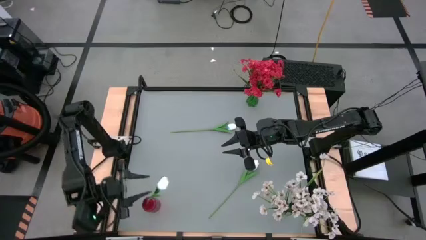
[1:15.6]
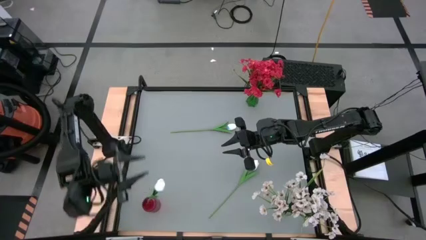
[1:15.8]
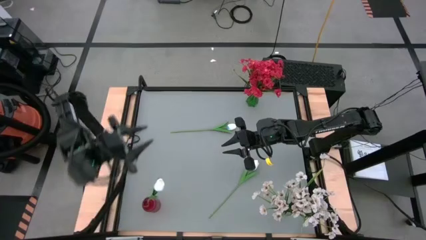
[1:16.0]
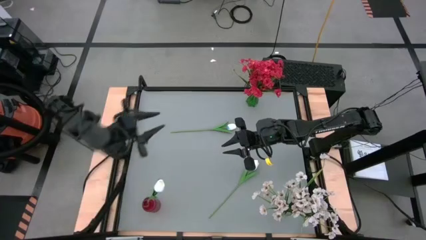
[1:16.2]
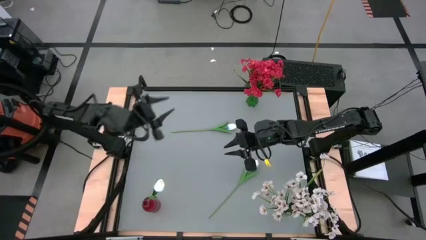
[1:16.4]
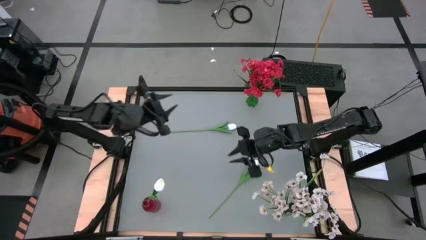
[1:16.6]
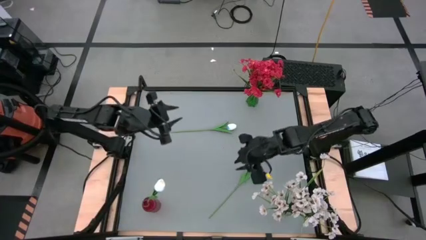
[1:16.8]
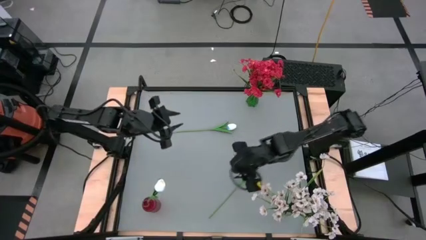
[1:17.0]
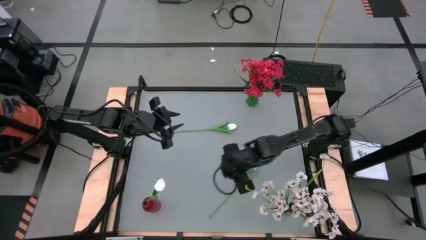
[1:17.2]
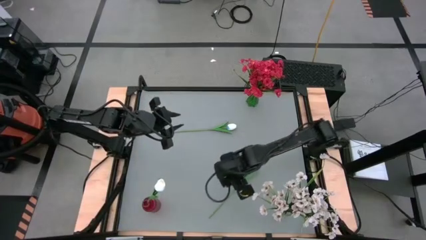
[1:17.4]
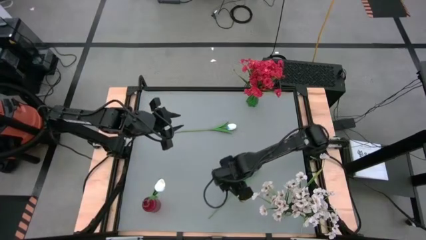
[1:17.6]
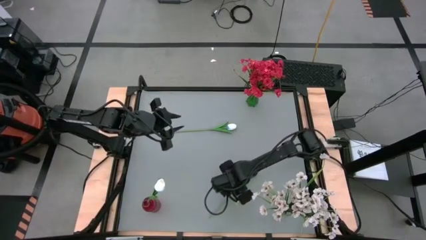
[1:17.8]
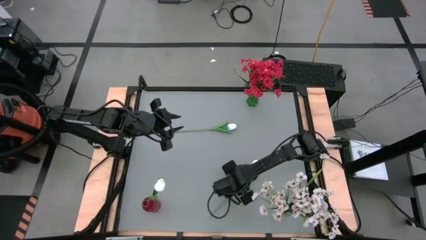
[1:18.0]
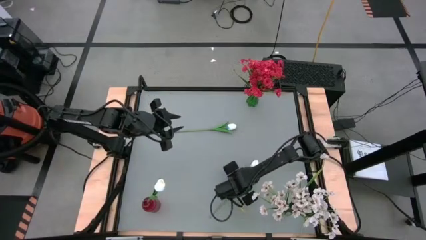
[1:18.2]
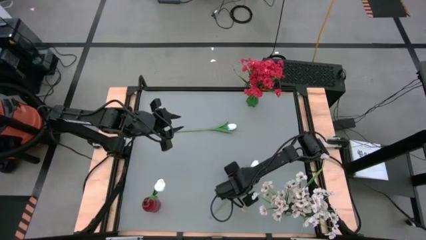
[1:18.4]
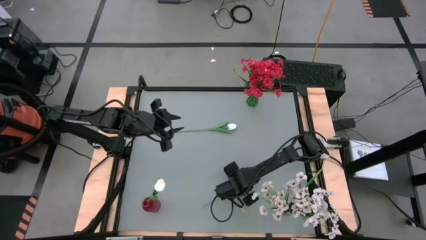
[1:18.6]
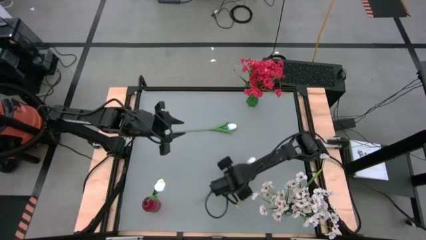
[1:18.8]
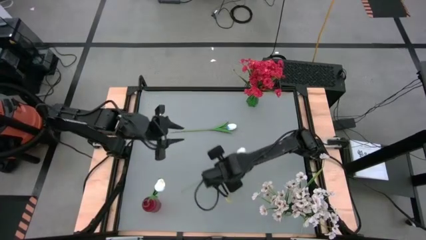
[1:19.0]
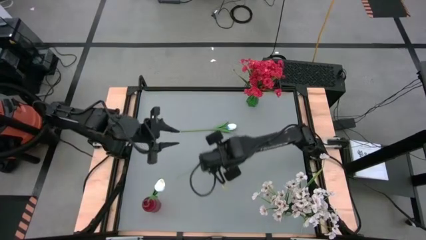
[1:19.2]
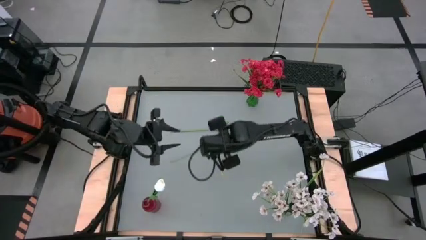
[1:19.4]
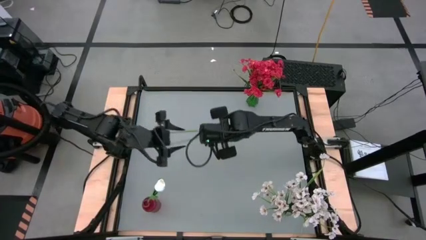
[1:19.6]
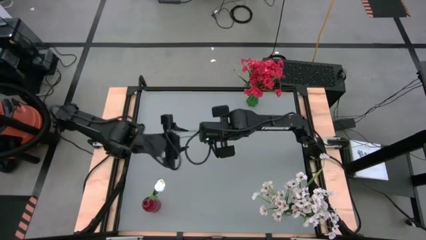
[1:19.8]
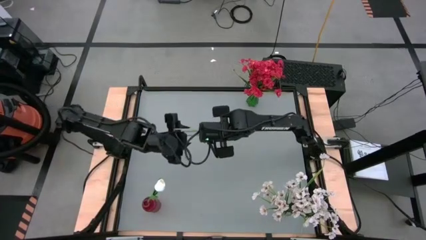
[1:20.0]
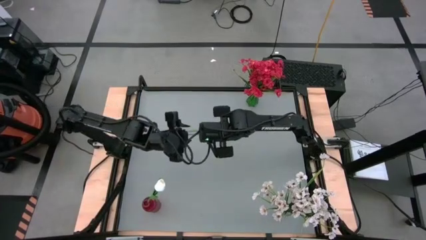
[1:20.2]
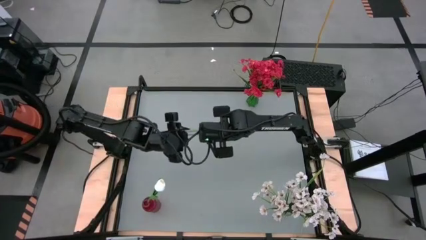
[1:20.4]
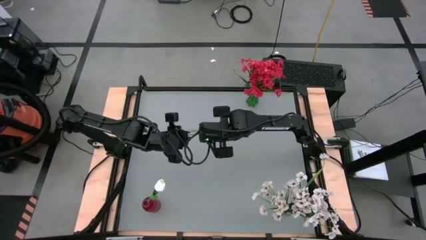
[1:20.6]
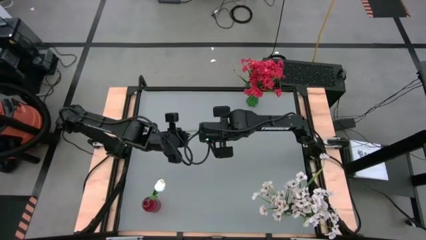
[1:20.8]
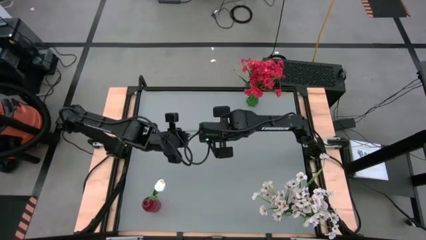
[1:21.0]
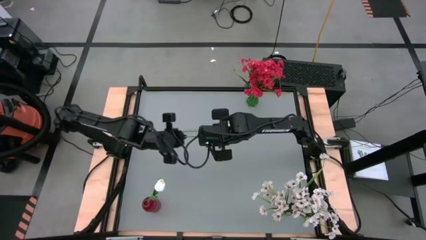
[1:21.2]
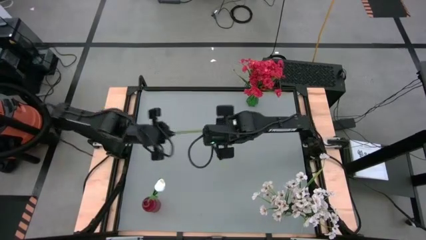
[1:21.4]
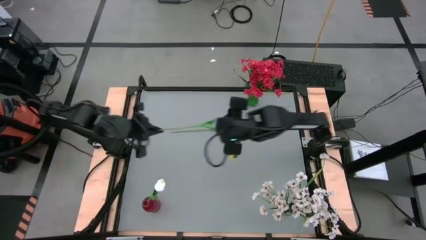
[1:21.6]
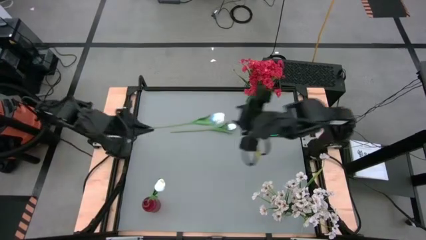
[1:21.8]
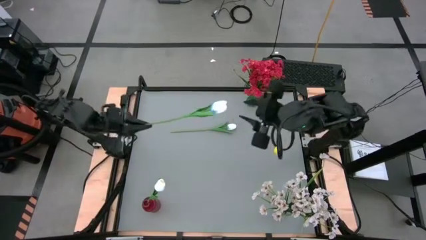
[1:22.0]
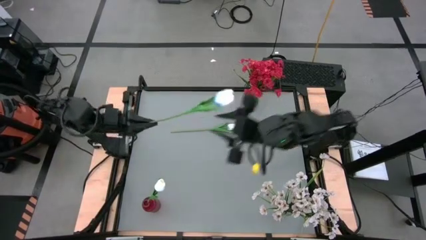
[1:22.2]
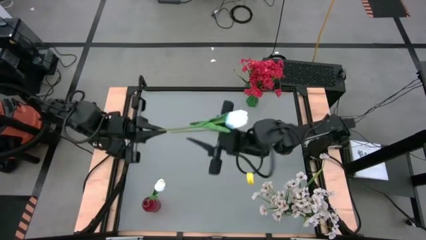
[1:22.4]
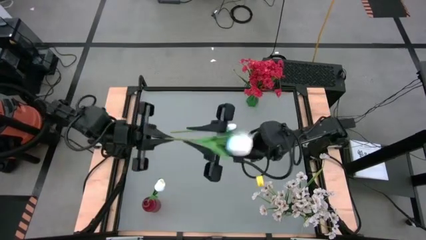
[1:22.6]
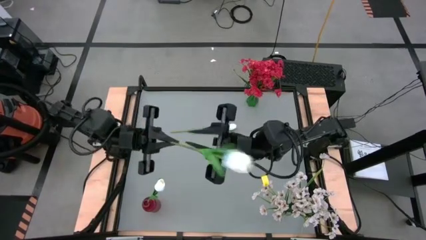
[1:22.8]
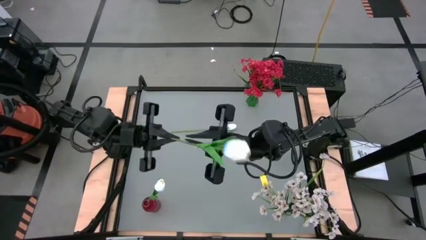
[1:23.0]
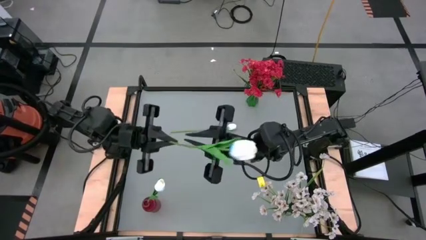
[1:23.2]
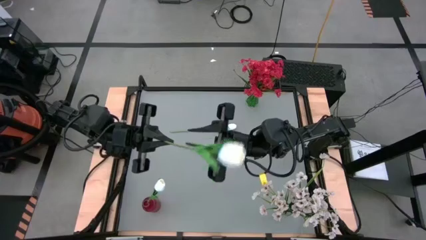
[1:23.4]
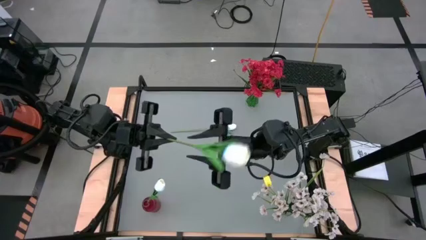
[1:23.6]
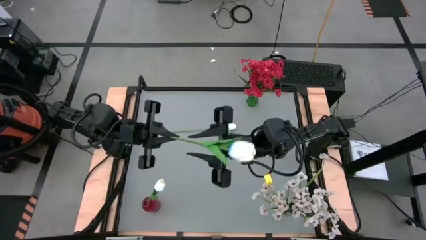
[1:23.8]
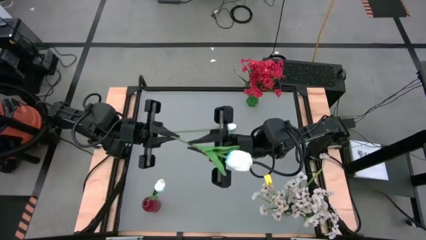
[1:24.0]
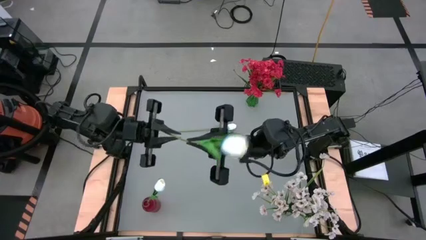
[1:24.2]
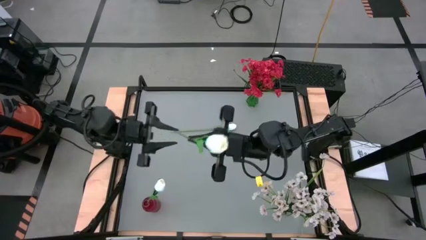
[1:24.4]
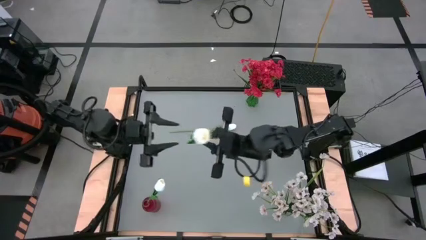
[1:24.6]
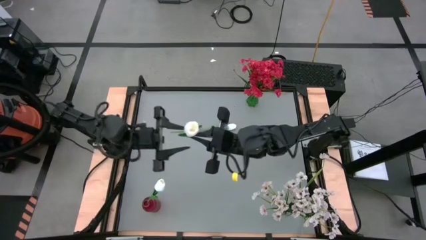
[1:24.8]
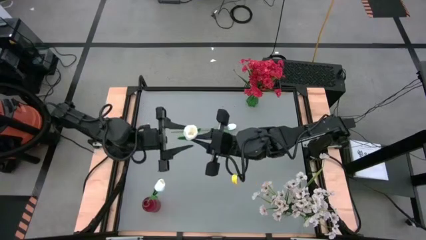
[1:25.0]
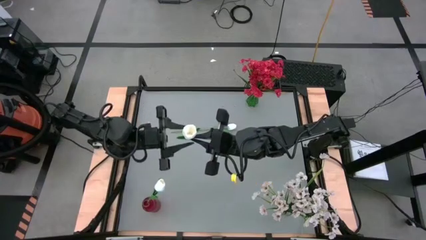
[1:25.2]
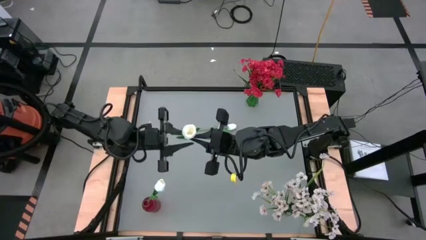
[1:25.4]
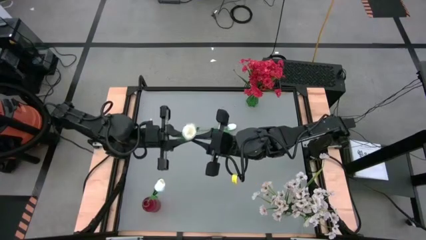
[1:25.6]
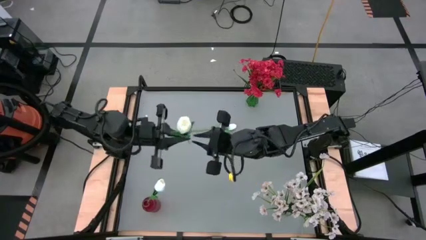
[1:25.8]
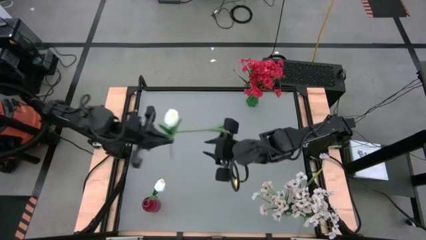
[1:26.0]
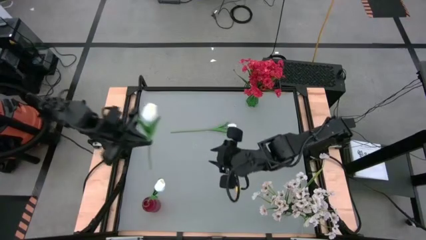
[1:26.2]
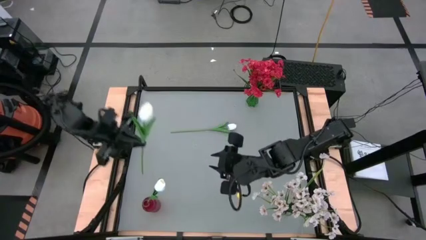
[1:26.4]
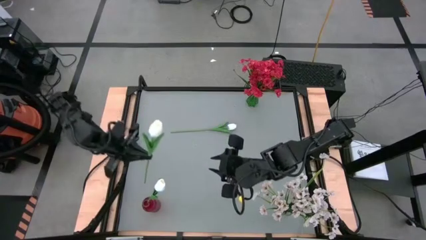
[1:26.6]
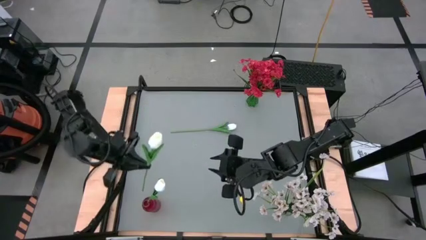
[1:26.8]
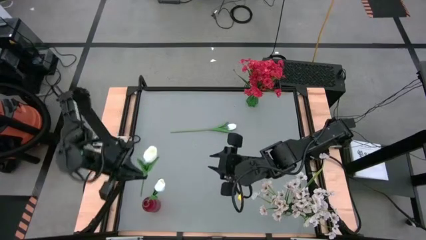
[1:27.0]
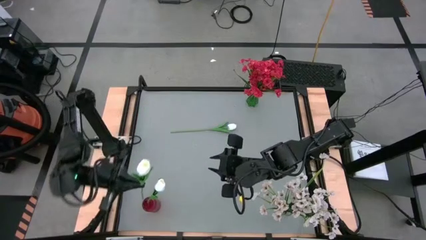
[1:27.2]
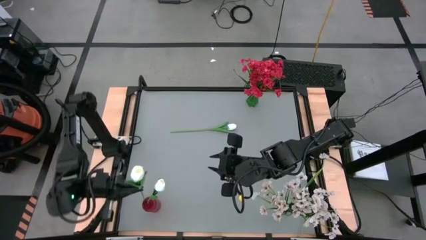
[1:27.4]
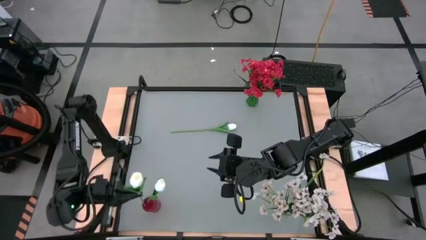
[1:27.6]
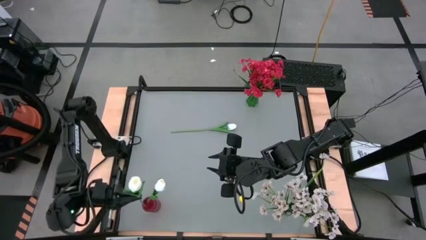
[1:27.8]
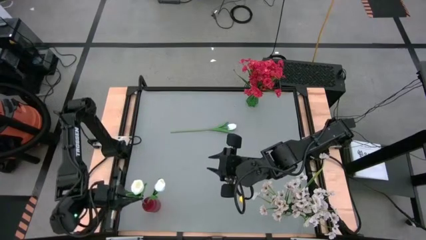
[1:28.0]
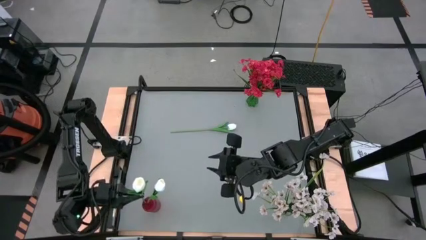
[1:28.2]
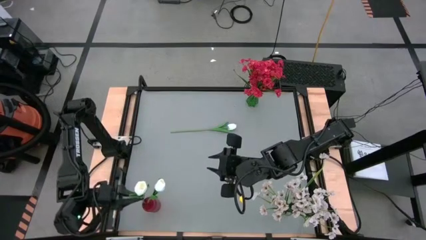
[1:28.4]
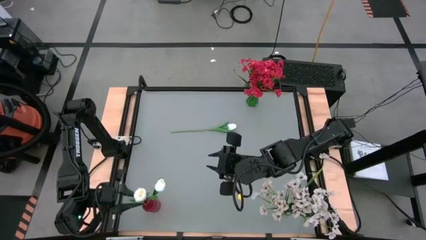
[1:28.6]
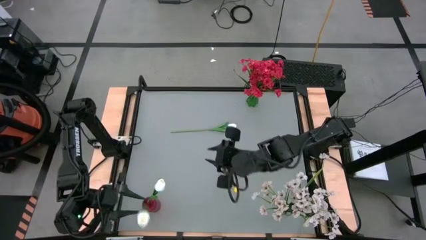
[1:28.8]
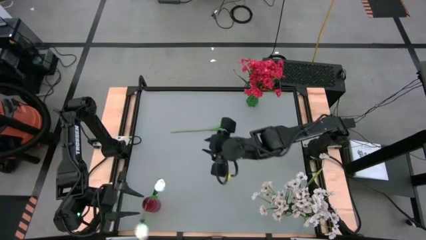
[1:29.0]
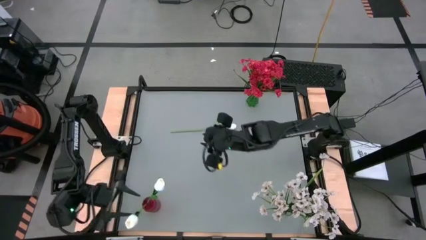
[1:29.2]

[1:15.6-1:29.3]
Task: Sort flowers into vase by color
Put the bottom white tulip flower into the red vase

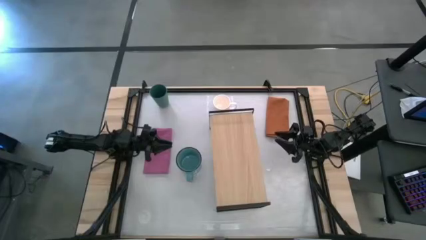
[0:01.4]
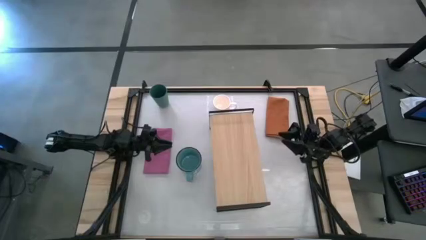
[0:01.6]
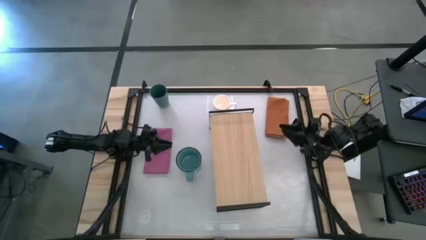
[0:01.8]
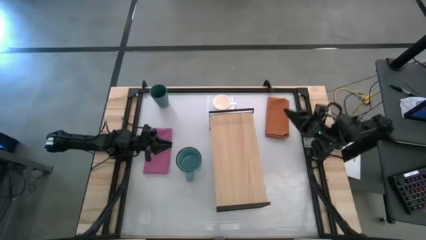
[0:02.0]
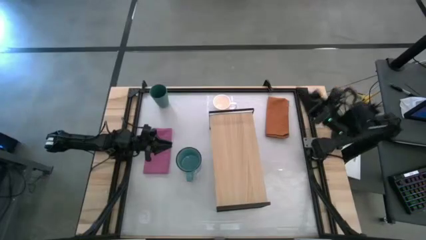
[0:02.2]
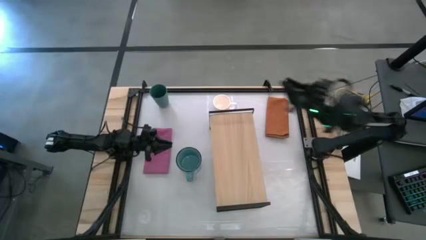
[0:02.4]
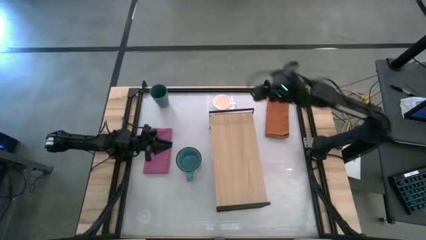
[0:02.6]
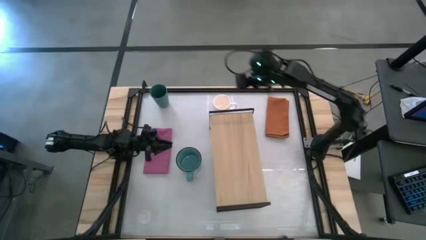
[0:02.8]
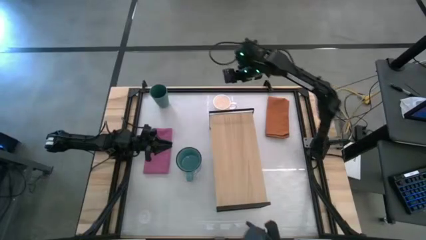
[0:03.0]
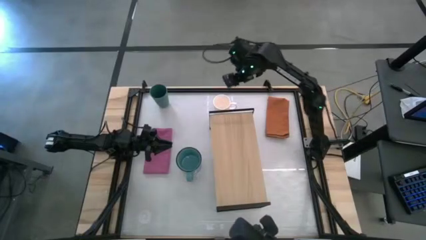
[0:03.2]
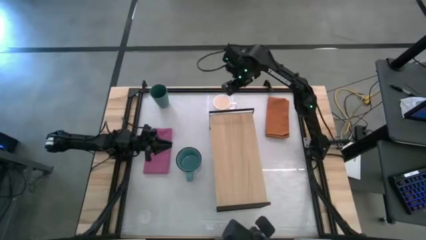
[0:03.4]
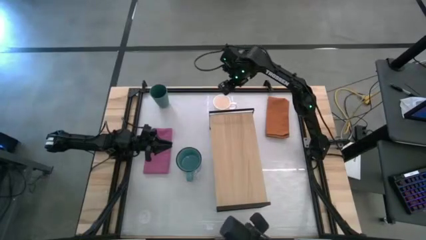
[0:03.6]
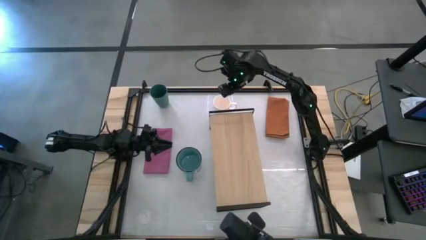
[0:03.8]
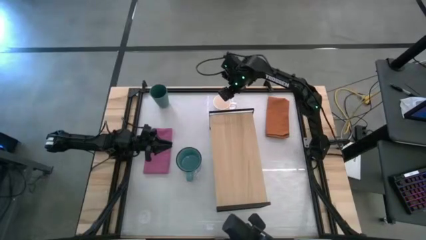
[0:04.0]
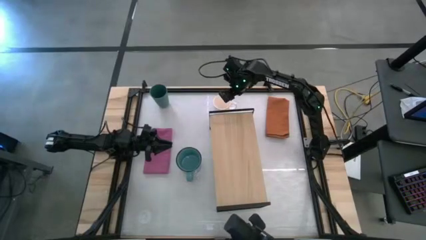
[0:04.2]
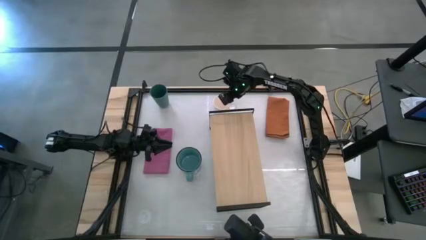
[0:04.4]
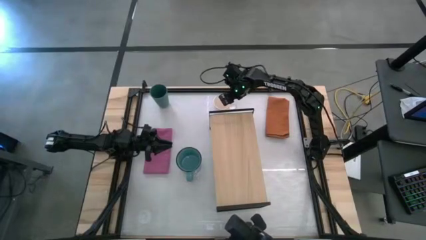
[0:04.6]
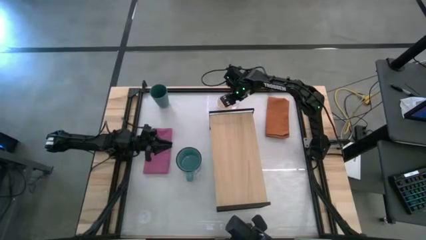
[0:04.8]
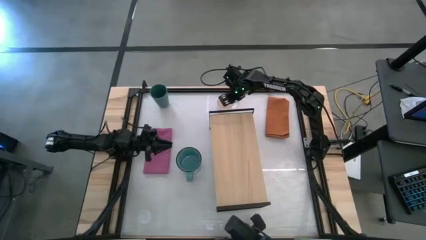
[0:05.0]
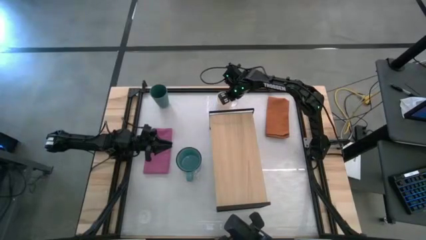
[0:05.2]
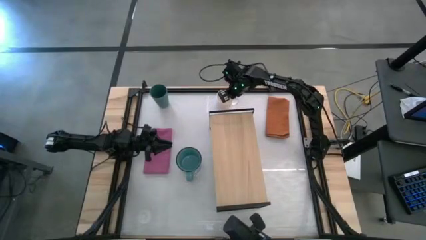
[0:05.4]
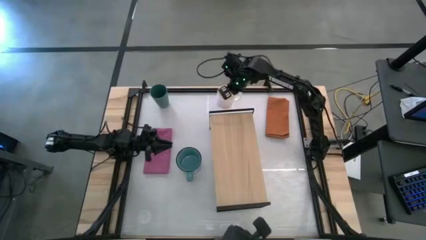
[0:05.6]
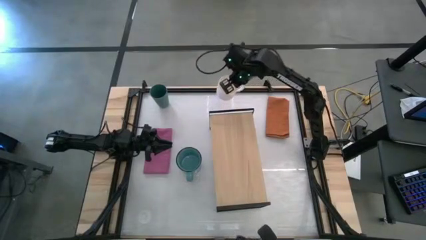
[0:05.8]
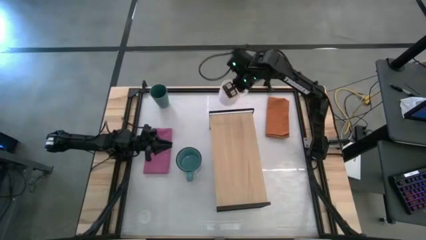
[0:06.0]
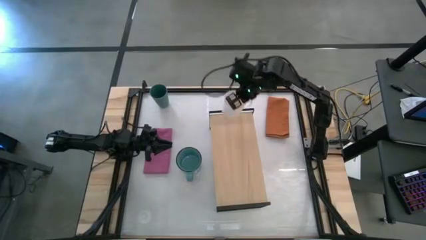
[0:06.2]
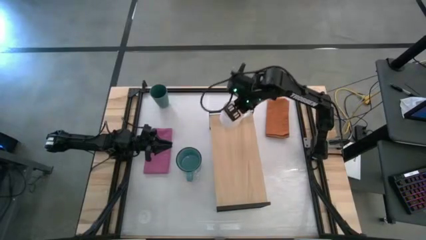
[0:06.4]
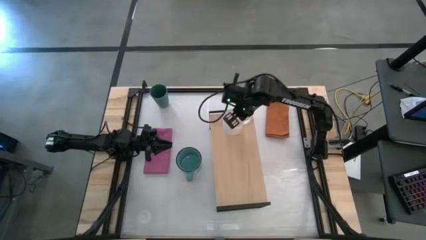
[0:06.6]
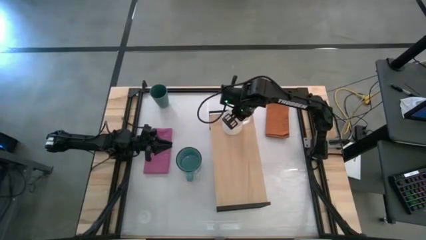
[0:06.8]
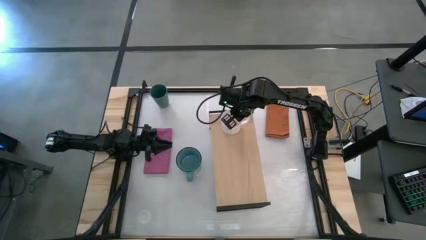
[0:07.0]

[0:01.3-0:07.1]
Task: Stack small to large cups/mugs on shelf
Put the white mug on the shelf
